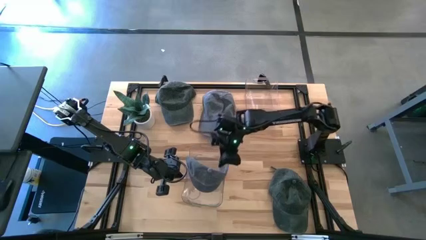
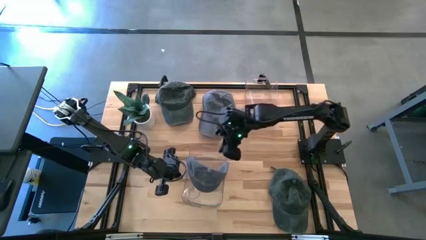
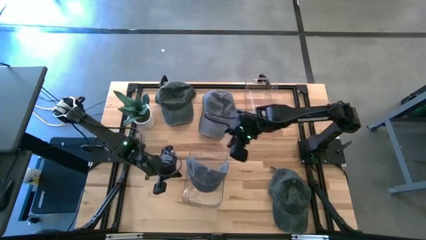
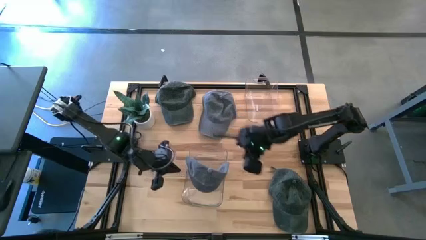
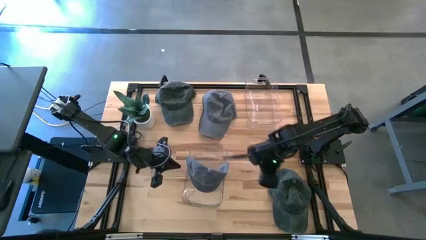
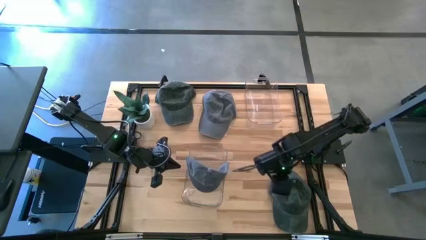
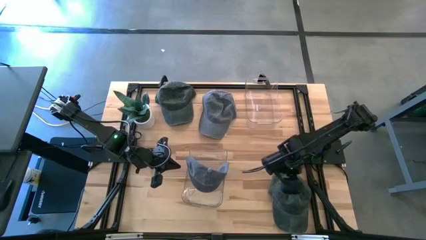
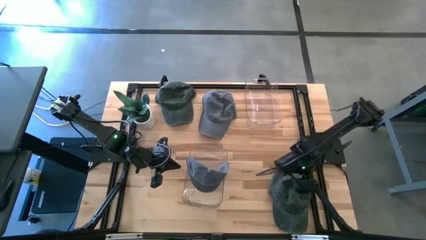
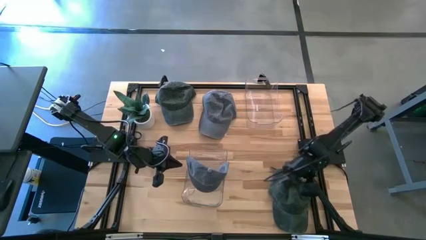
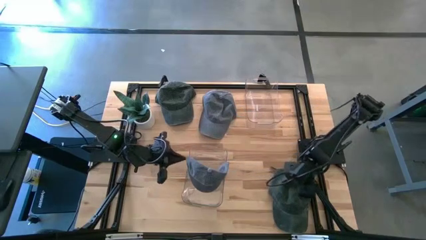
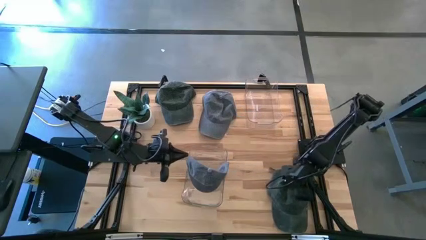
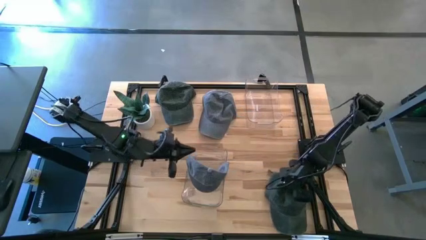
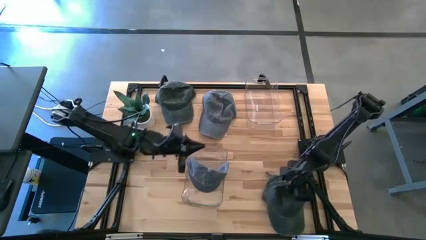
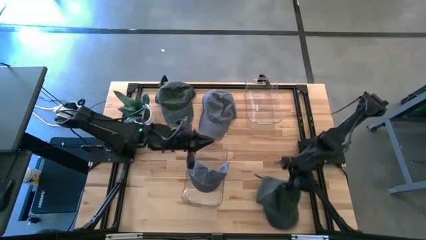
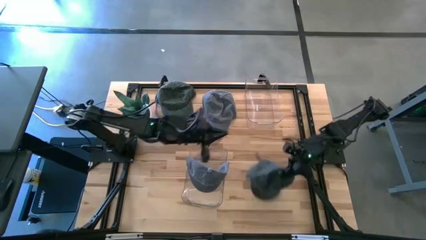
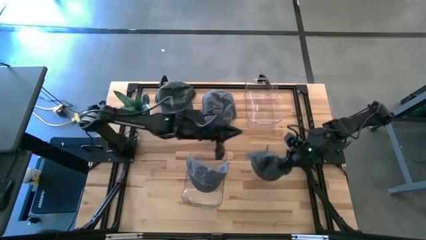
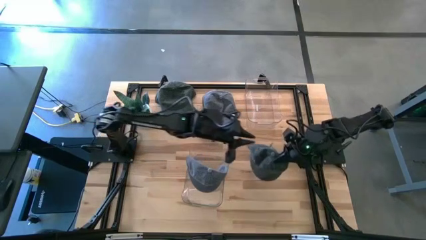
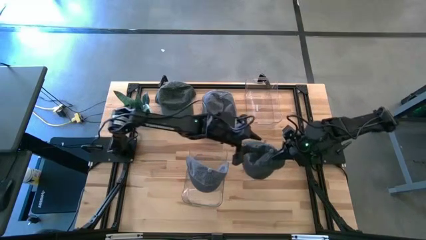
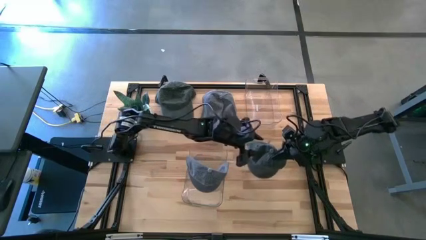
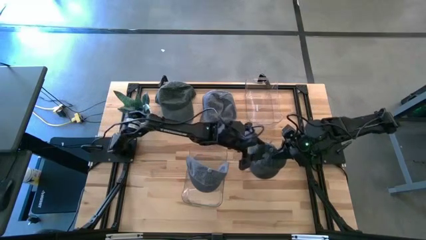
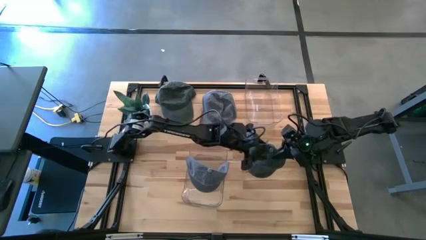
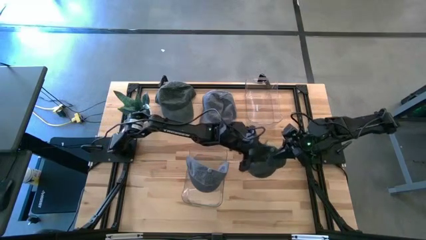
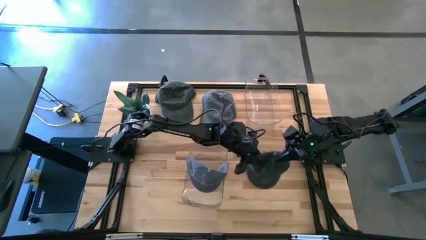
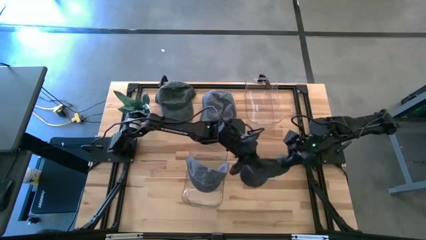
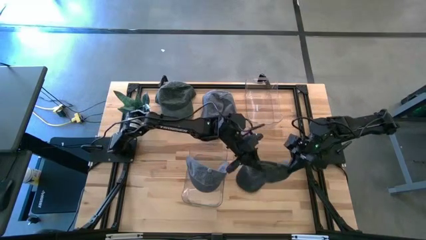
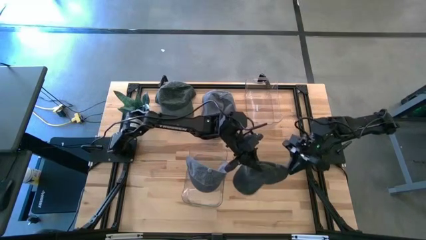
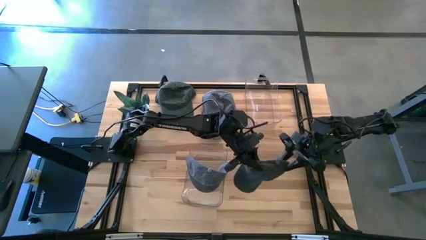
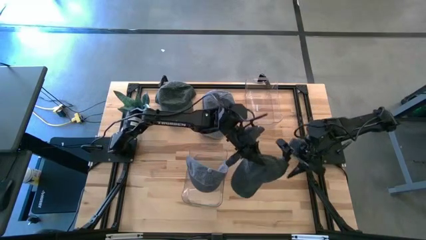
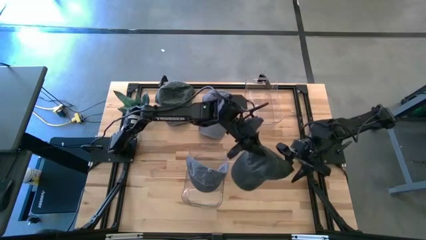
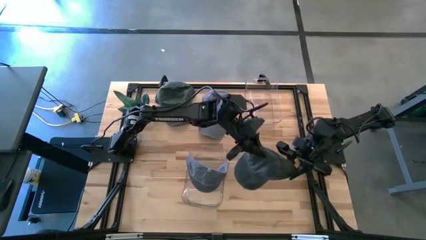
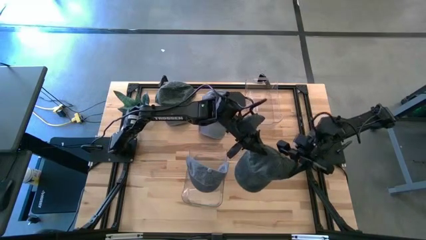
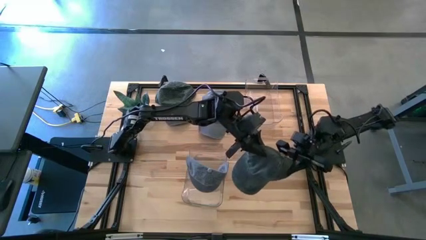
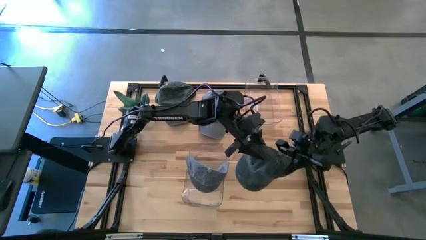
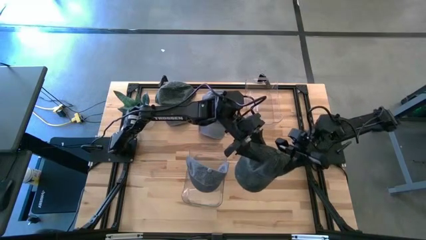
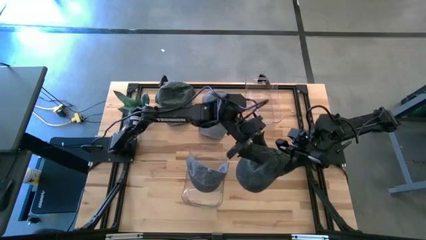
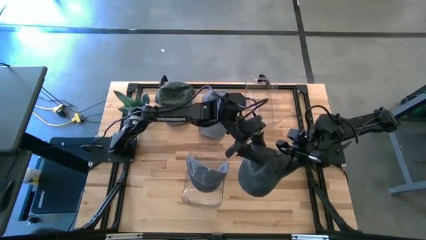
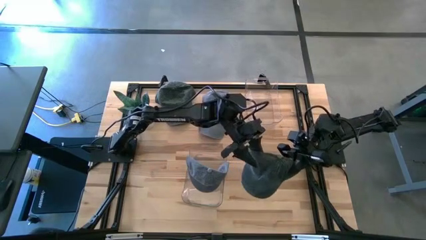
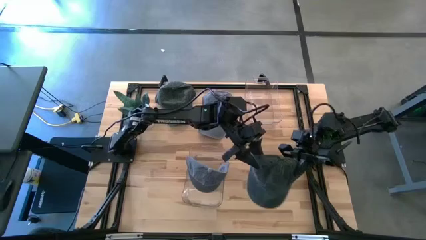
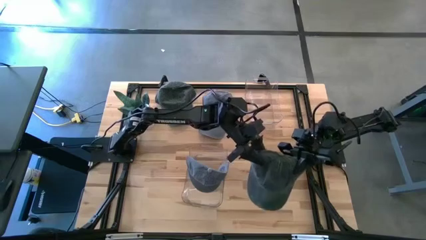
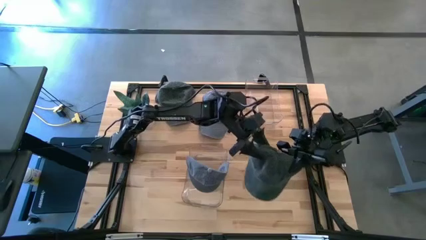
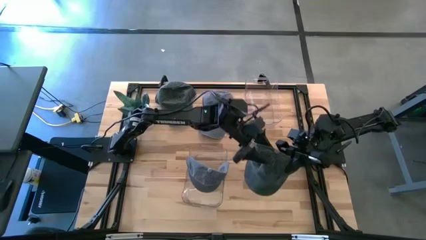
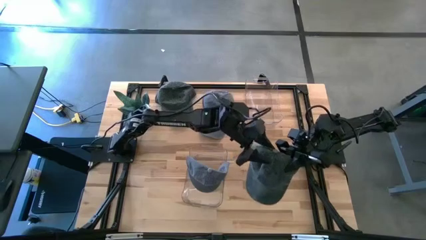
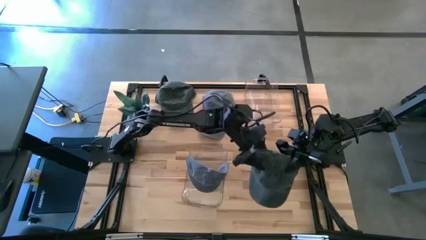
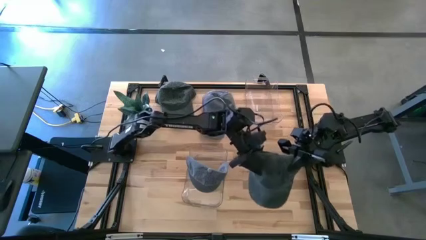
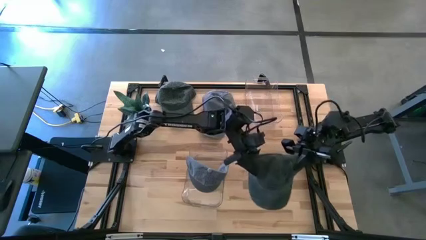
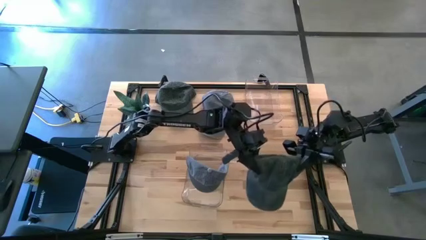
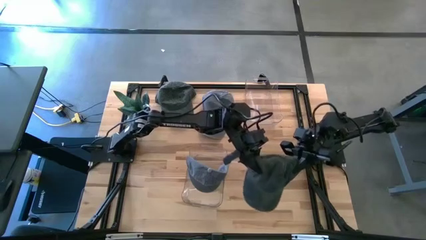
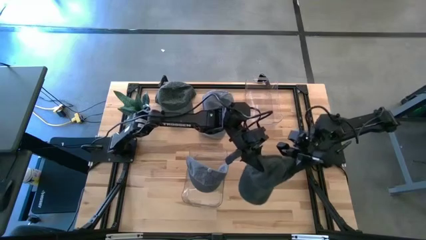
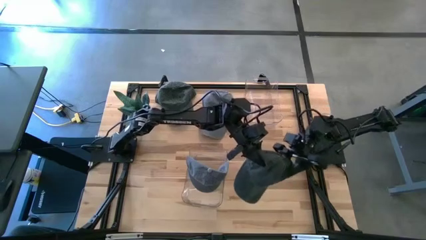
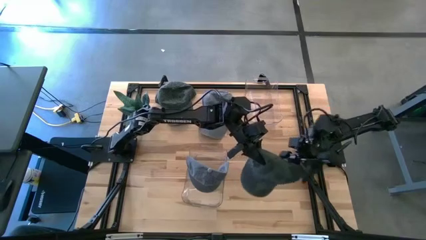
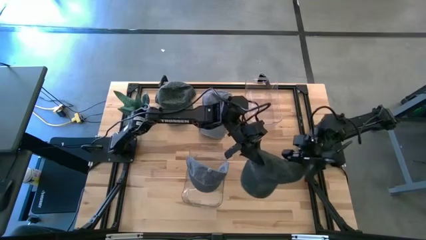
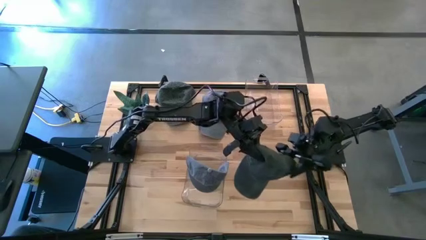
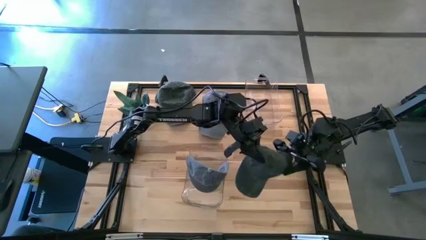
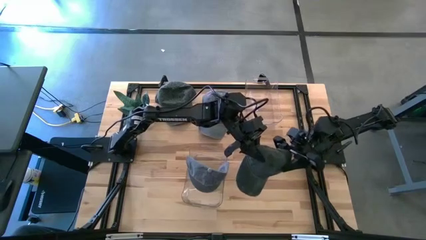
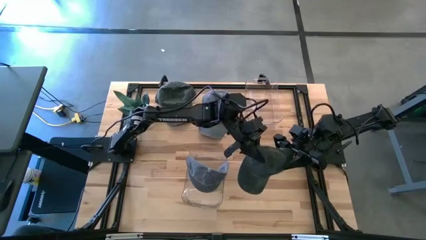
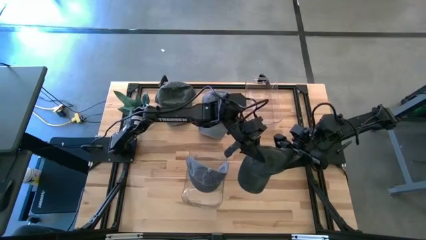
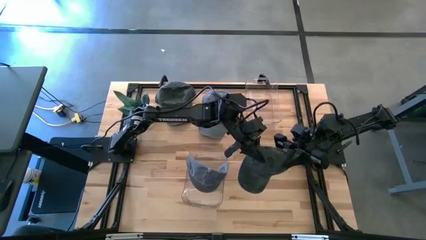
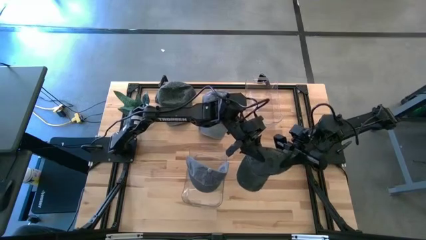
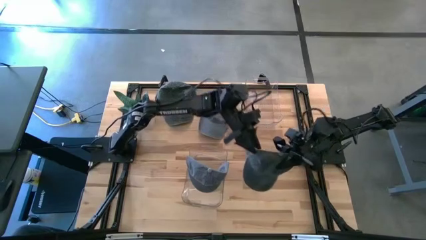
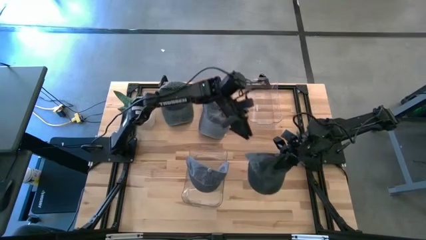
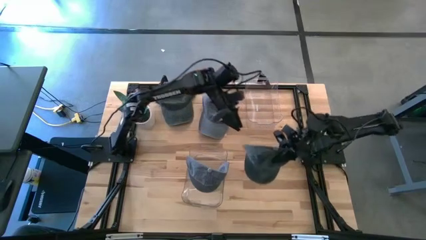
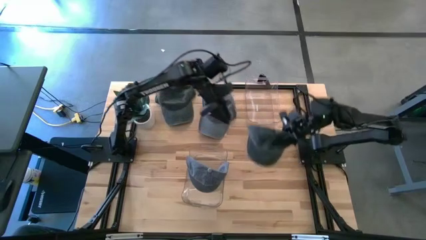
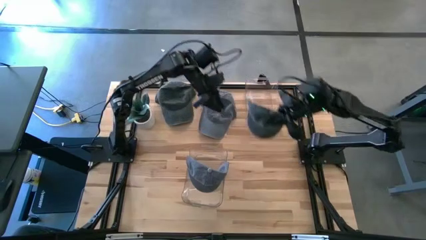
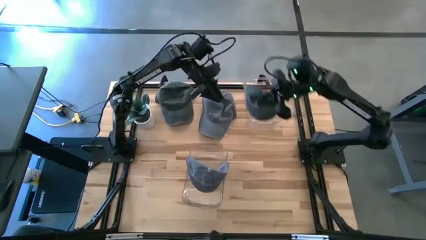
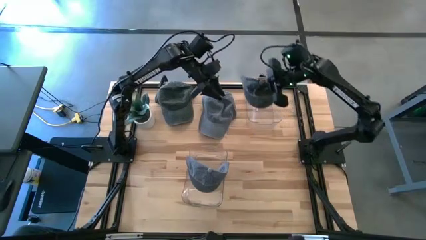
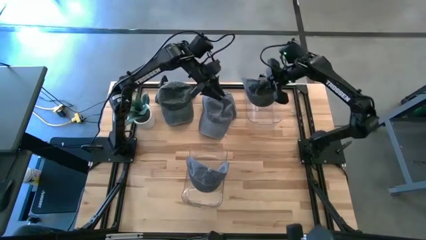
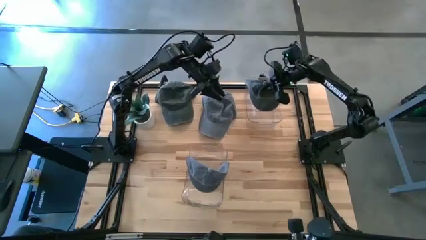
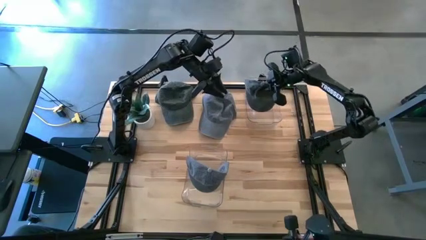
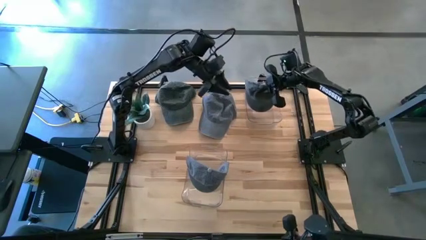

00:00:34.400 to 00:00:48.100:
Task: Pick & Place hat
Put the bottom black cap into the top transparent bin
